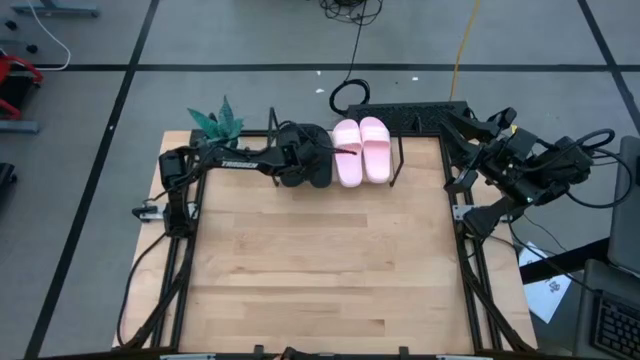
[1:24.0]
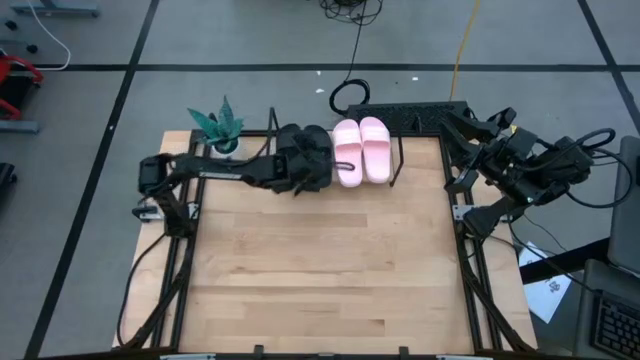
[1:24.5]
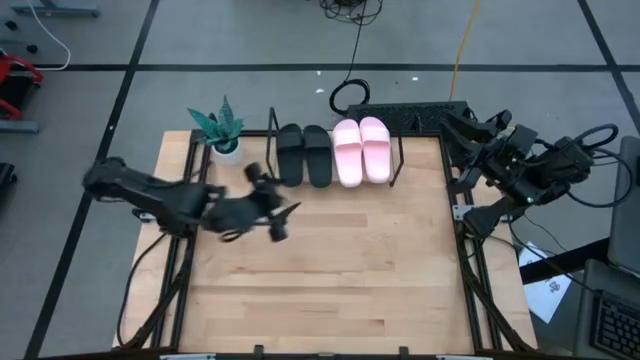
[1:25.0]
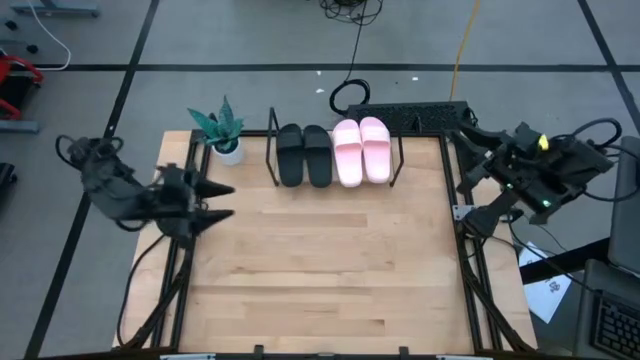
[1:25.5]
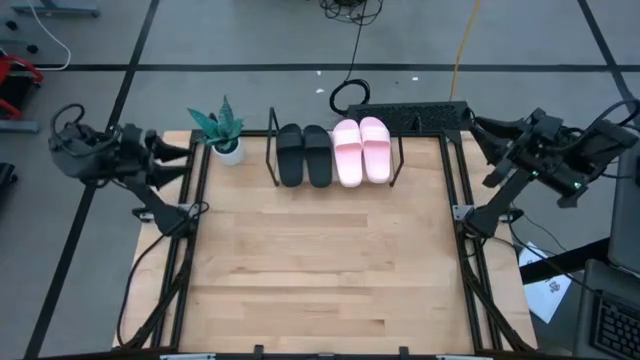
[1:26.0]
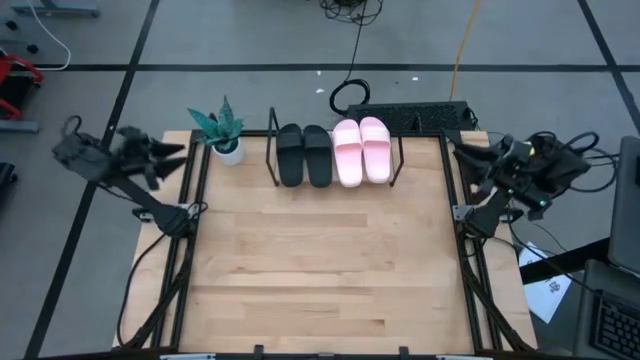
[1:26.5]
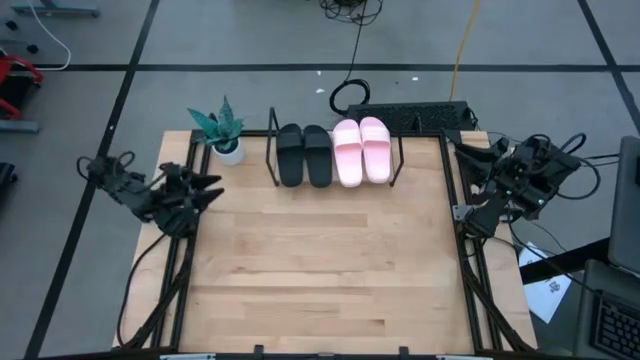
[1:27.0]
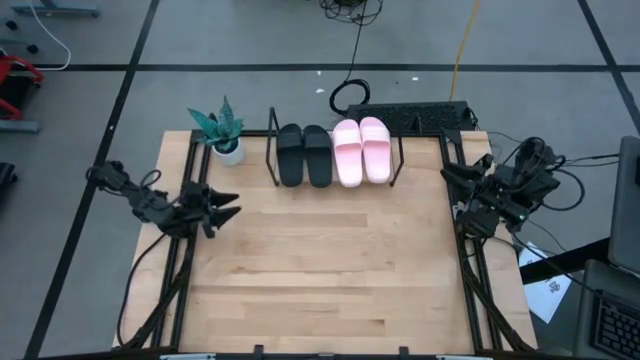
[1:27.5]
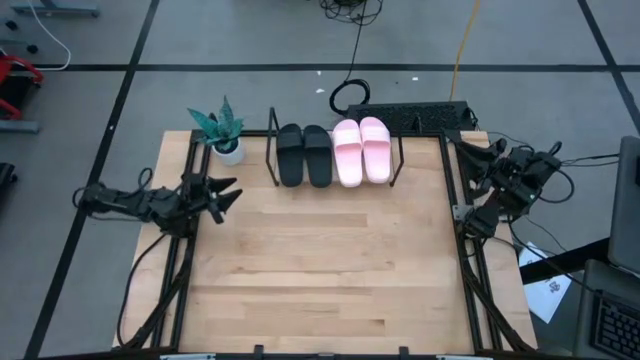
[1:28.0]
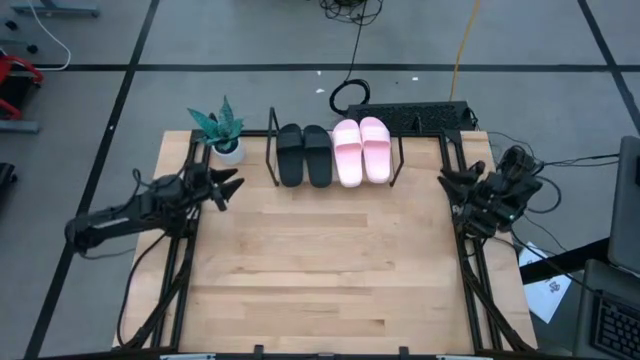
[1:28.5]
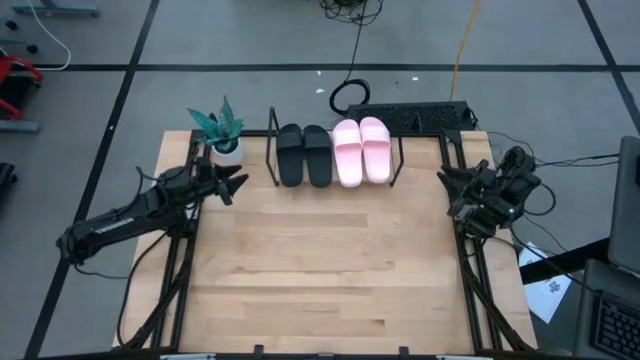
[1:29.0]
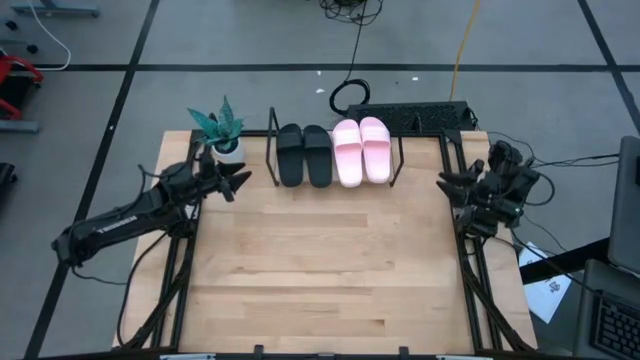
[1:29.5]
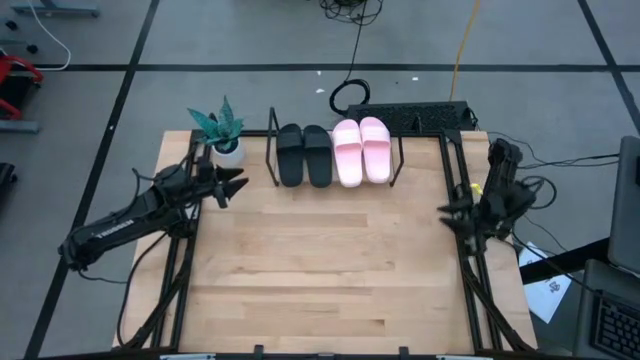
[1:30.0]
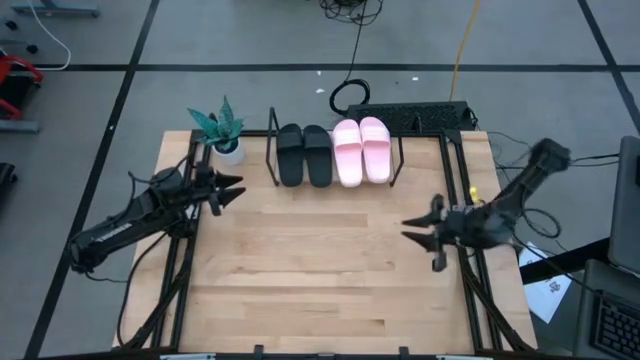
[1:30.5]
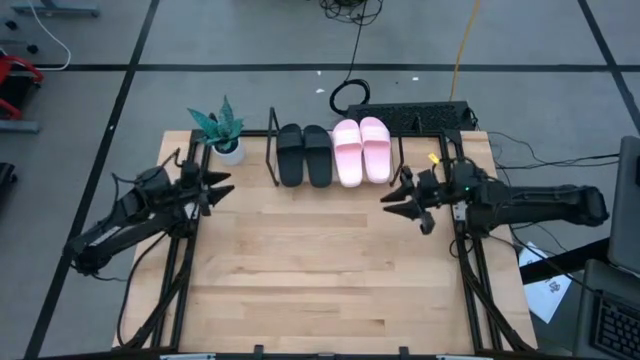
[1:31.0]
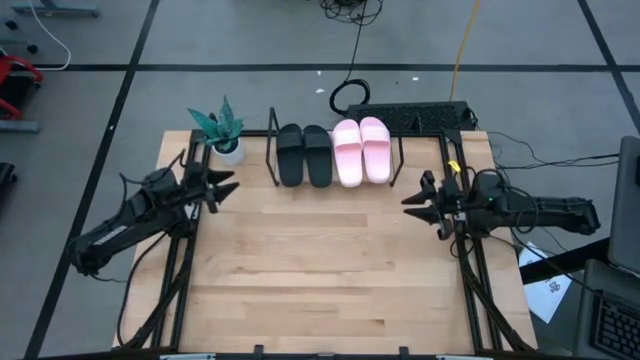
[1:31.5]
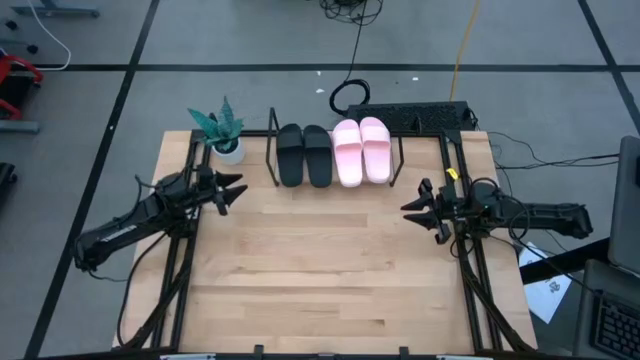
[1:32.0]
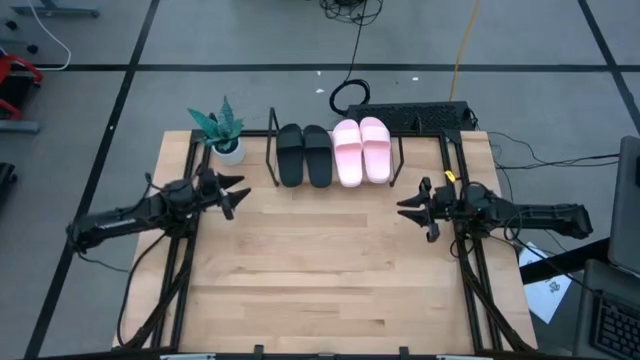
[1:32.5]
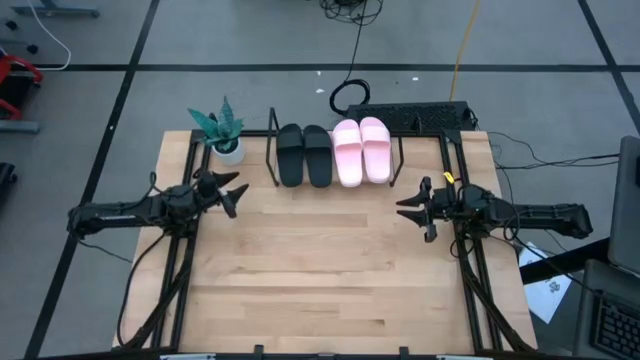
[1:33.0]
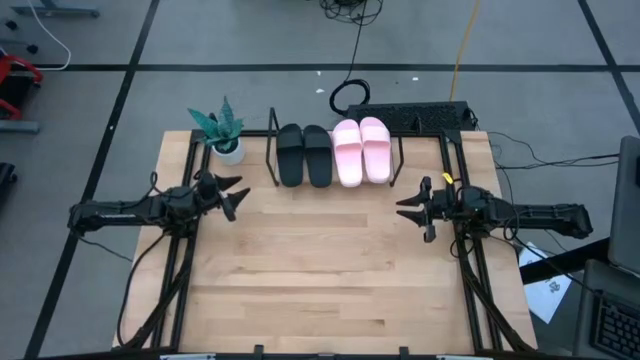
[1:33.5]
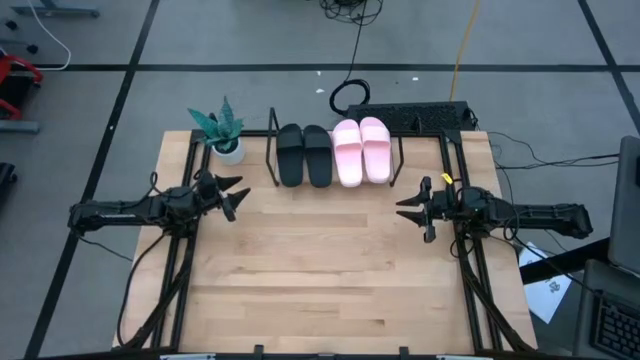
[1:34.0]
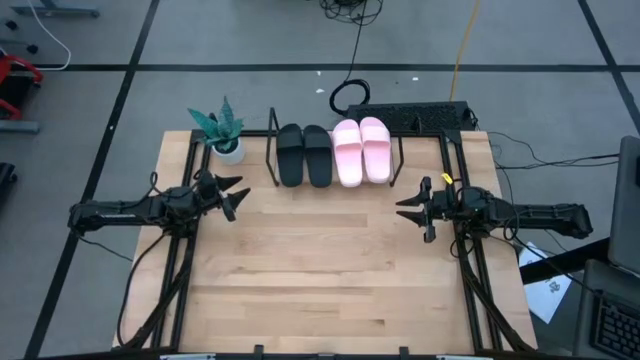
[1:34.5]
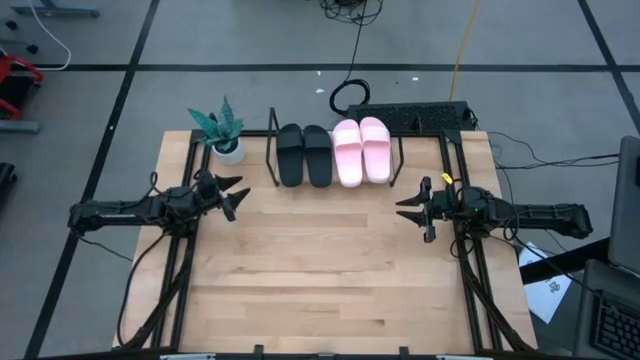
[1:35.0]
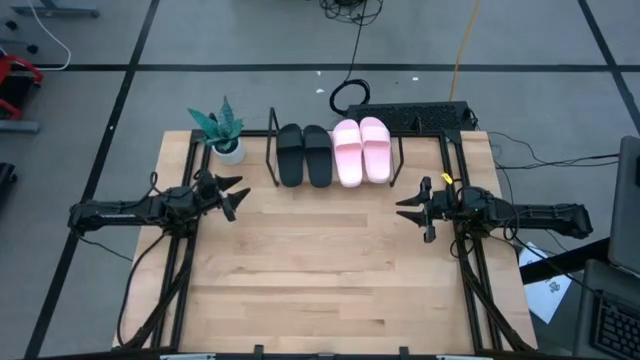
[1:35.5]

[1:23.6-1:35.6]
Task: Pick and place slides into the shelf
Return to Home Position

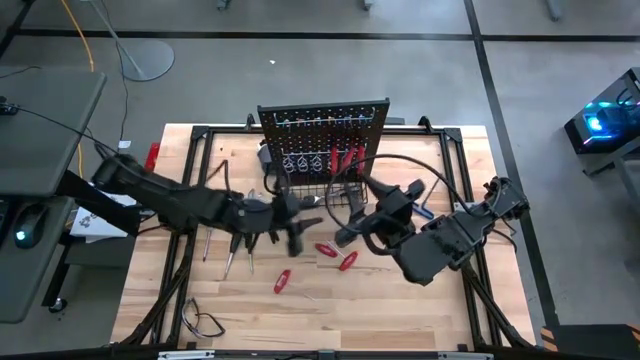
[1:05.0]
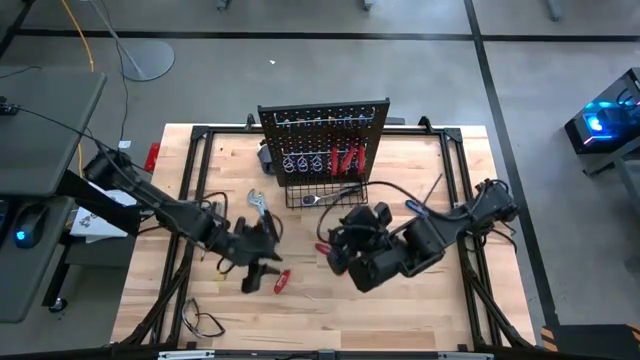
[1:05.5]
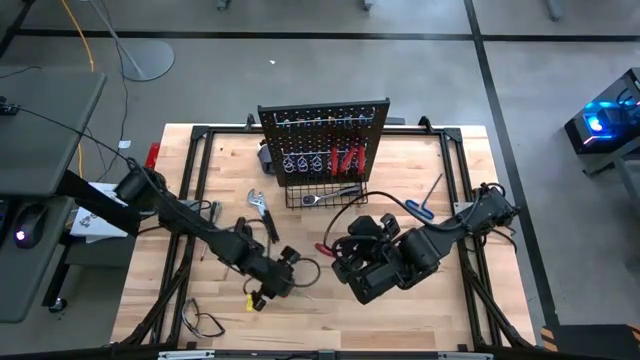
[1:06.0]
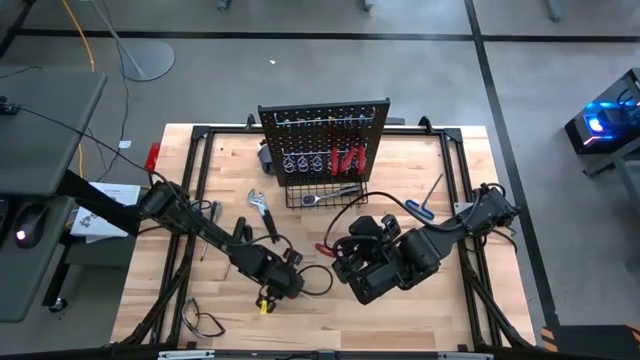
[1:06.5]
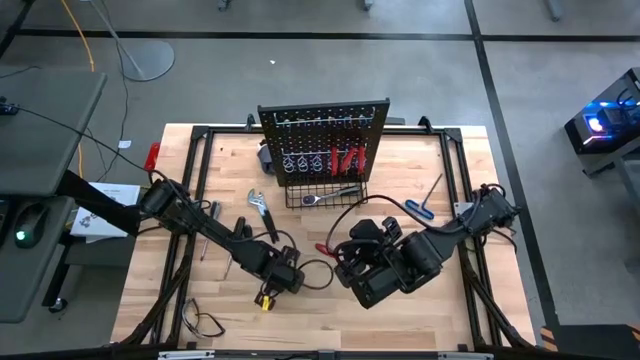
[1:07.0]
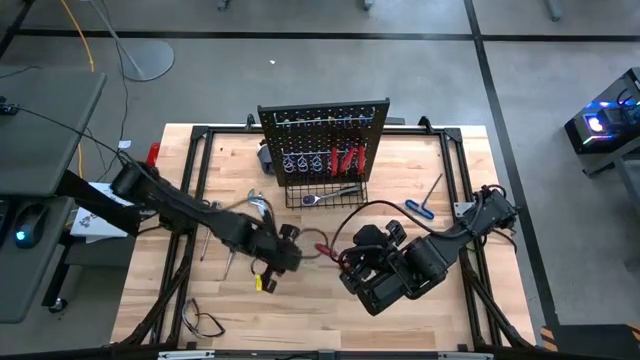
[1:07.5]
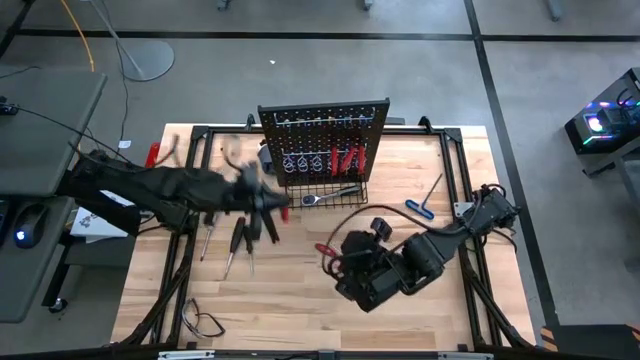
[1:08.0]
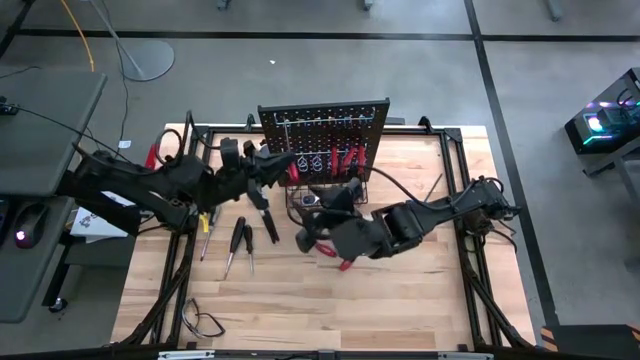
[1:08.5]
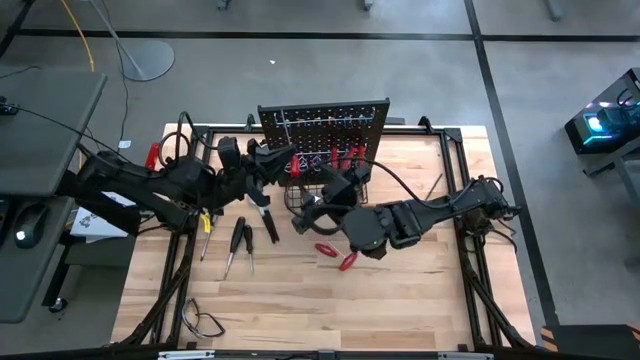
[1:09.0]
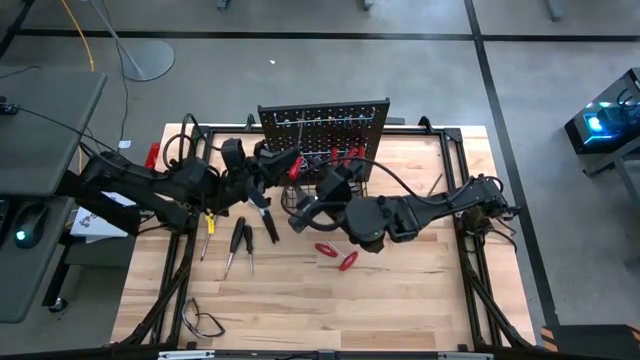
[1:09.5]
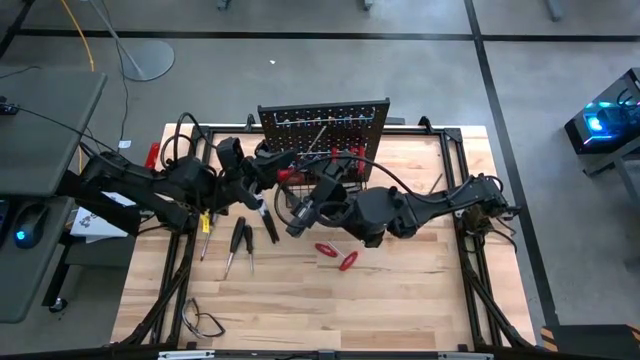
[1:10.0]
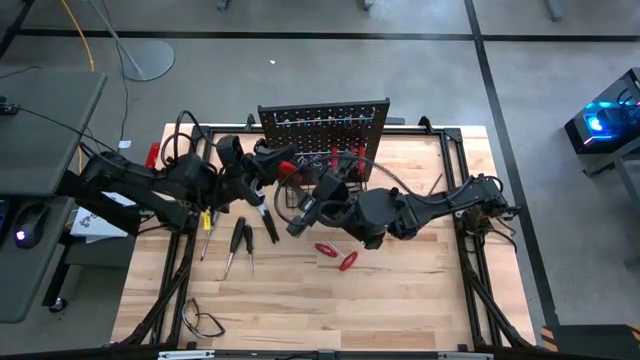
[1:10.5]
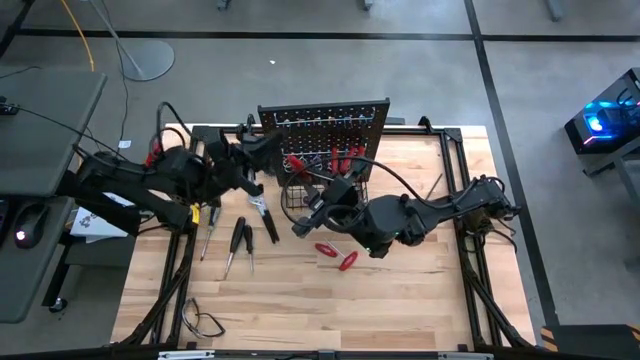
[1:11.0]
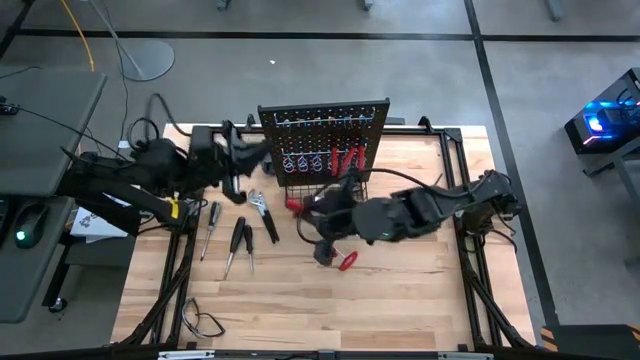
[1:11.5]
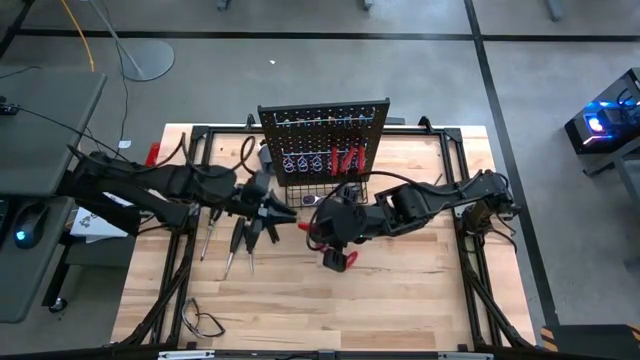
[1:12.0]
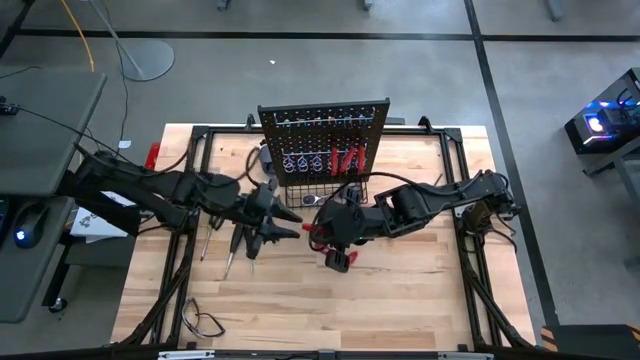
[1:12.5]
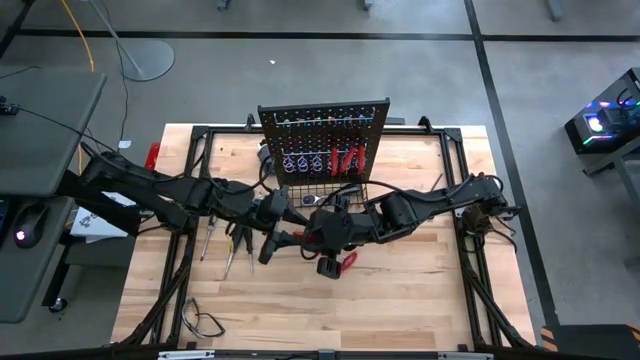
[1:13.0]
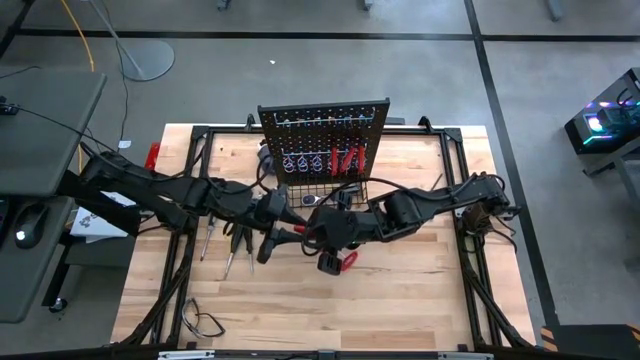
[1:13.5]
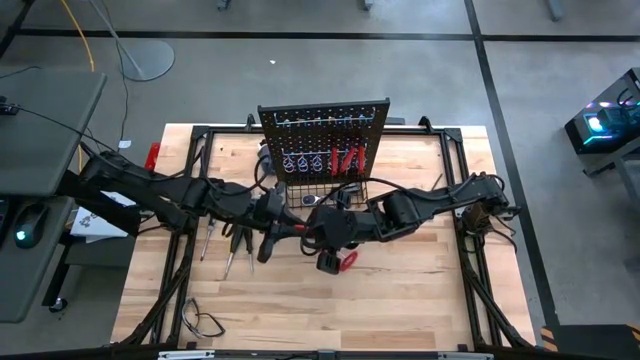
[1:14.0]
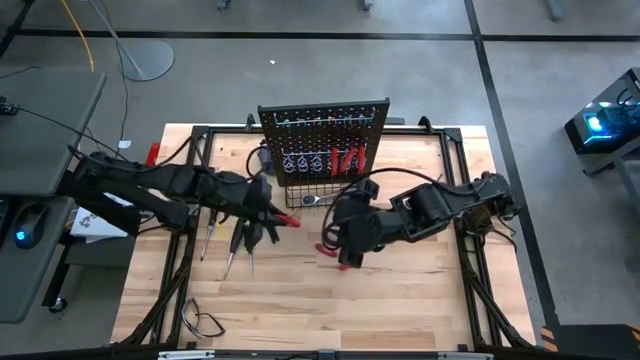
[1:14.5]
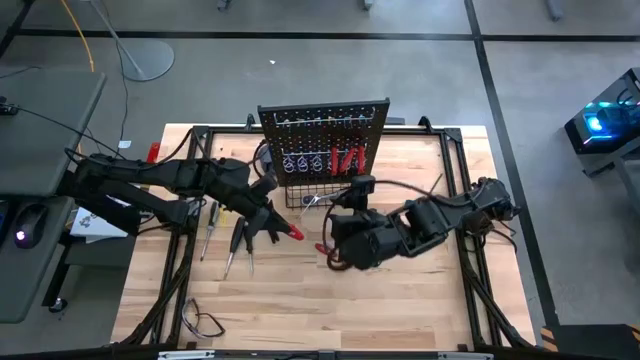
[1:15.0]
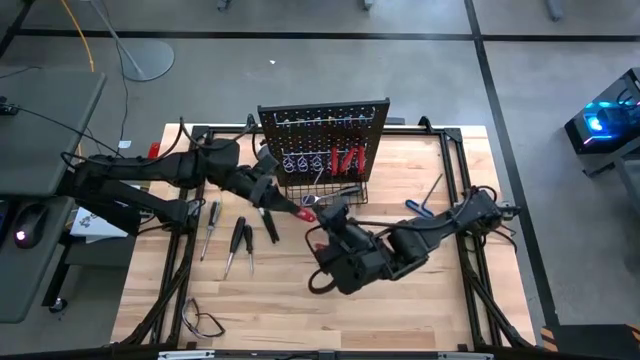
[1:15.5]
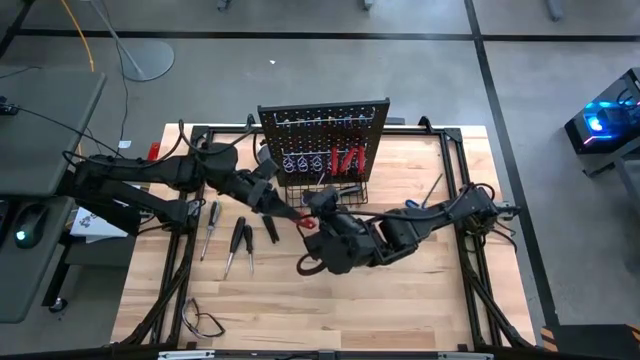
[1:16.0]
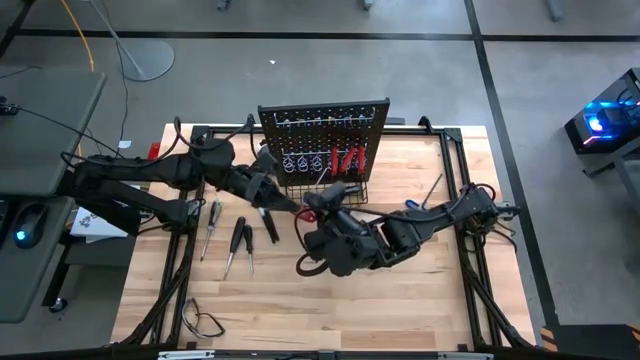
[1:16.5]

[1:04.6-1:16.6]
Task: Hang tools onto peg board
Hang the red allen wrench on the peg board
